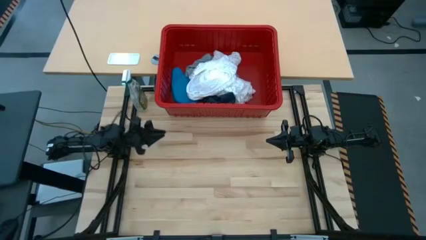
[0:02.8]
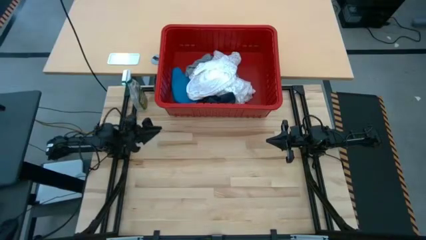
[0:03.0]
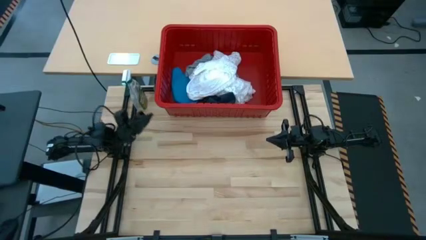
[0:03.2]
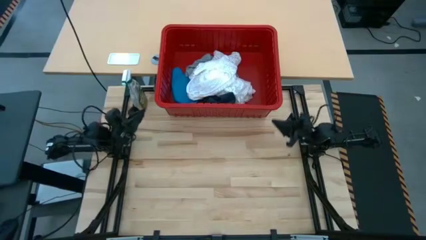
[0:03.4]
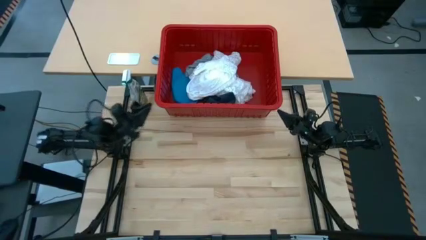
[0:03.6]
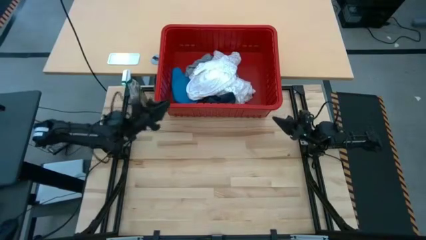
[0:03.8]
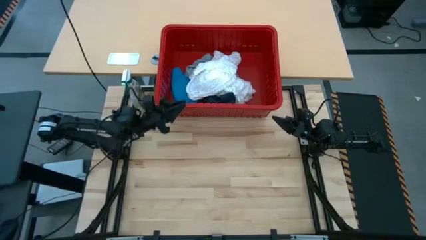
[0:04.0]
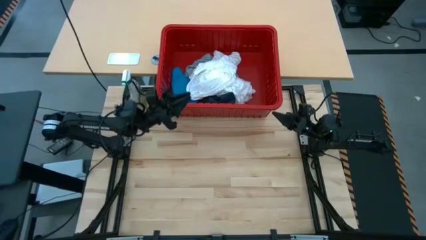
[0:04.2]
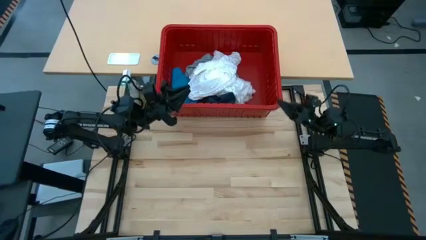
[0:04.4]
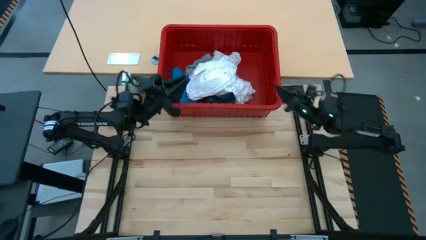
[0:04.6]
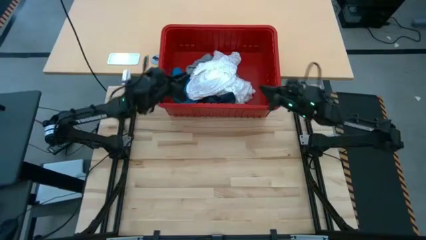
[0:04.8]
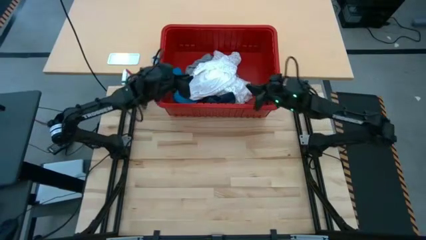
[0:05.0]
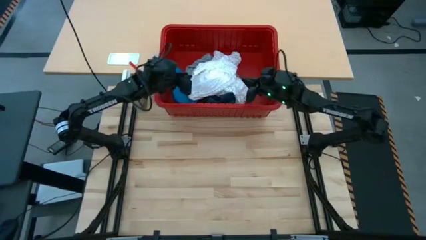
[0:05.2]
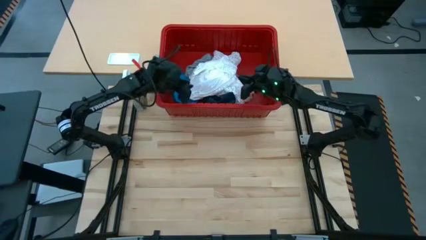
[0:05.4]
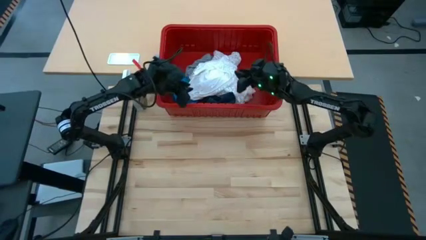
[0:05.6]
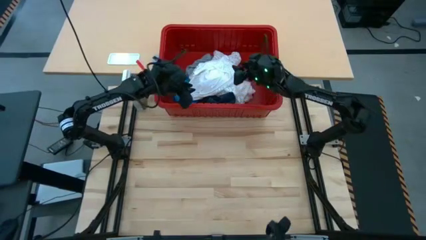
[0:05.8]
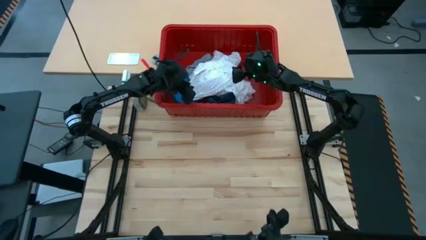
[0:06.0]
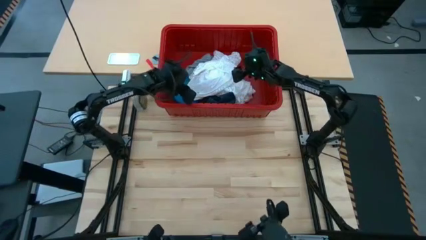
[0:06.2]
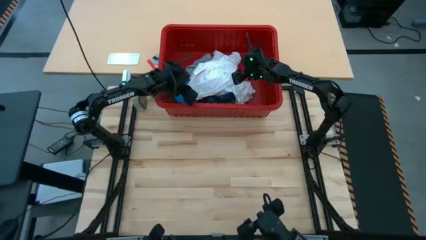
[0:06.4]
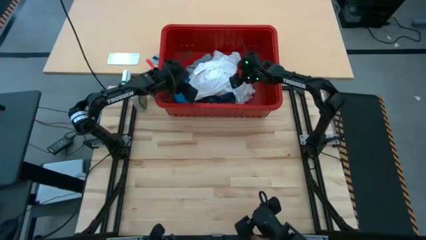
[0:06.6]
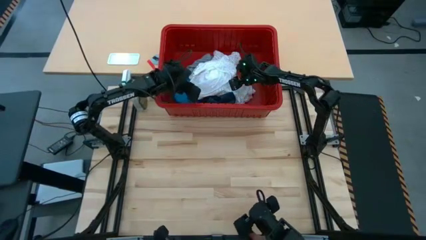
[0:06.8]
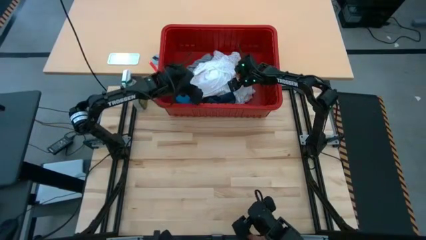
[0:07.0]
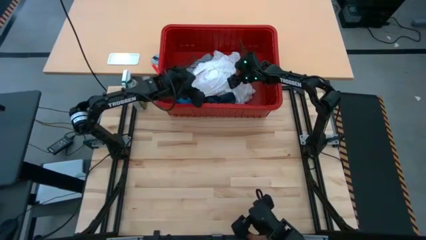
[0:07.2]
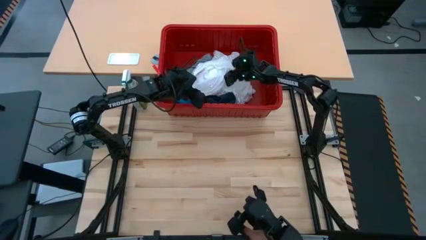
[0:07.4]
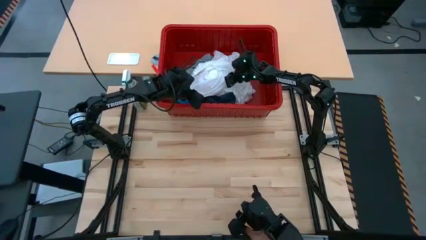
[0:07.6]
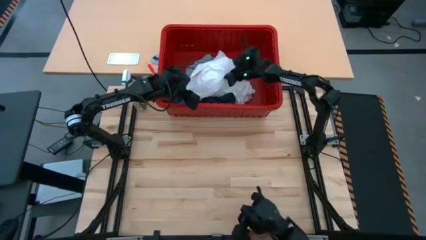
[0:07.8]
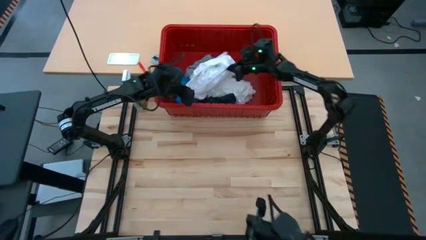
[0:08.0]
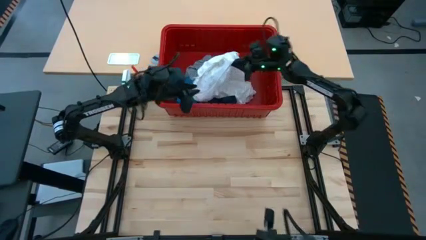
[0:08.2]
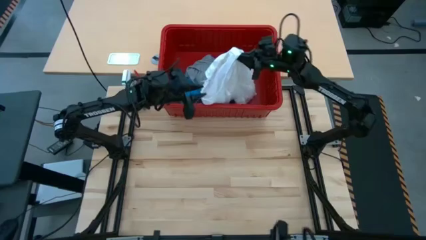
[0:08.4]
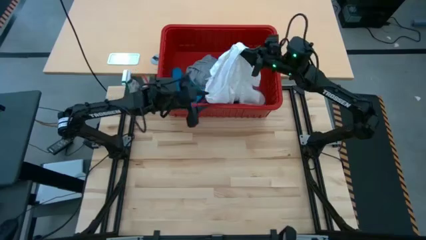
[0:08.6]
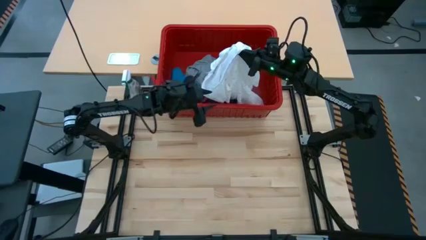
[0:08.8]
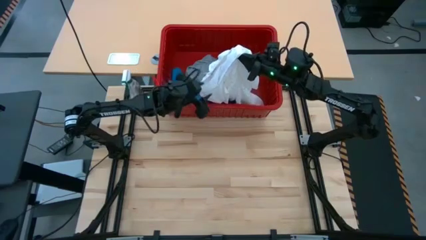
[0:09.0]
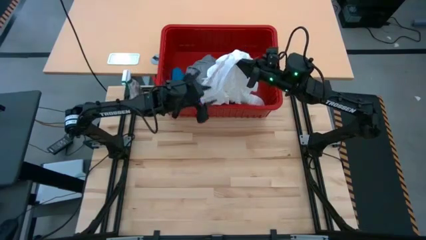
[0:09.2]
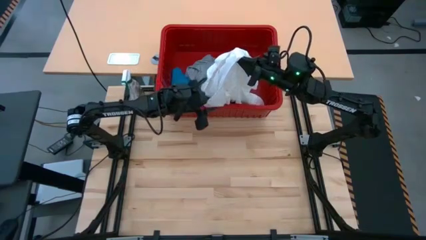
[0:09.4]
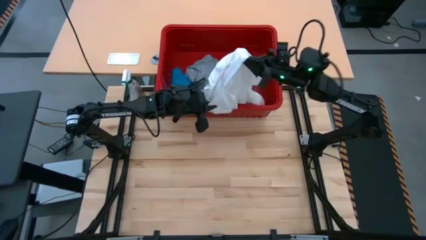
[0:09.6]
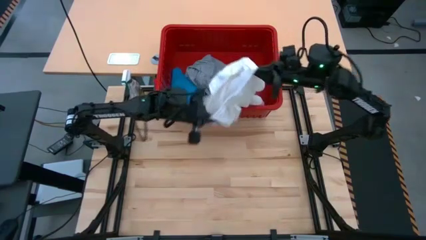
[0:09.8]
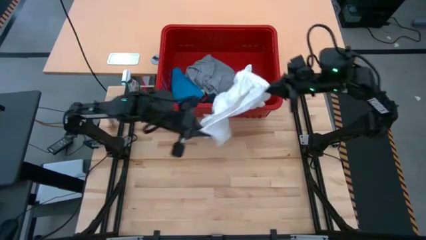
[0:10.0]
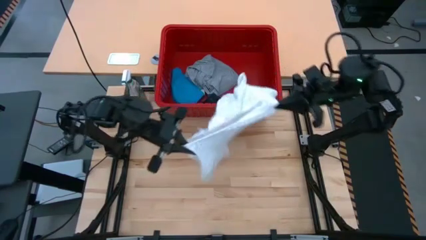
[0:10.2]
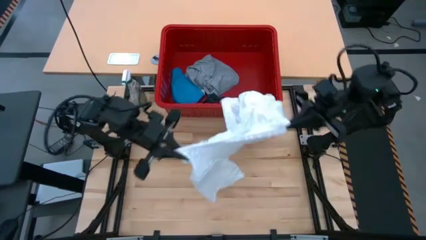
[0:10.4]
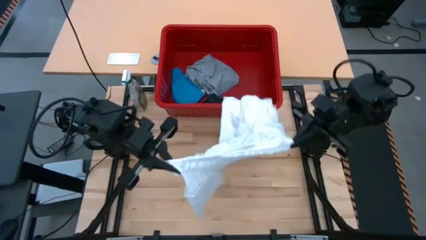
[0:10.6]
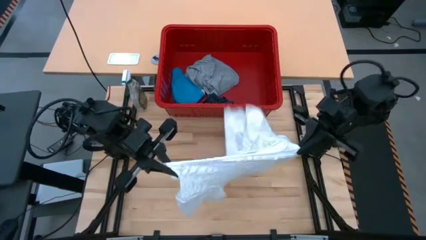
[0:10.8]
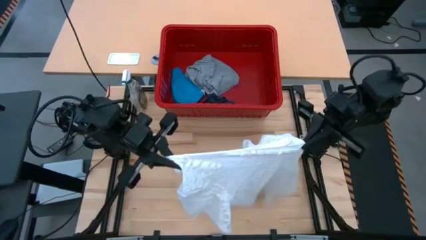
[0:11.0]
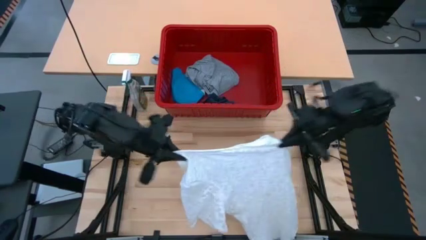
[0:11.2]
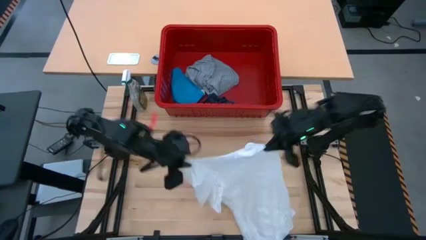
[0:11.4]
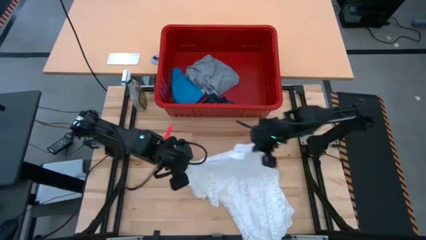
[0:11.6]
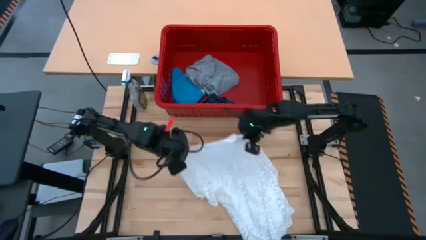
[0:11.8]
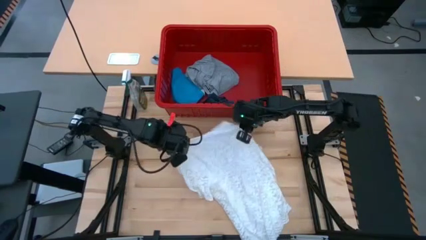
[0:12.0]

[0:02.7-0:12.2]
Task: Fold laundry
Remove the white dress from the red laundry bin

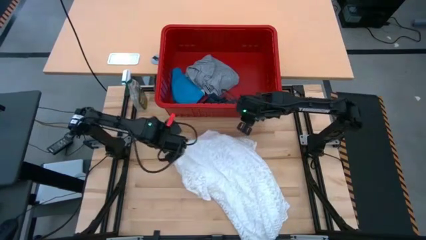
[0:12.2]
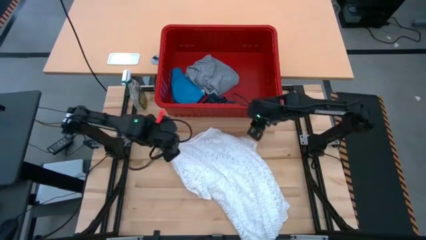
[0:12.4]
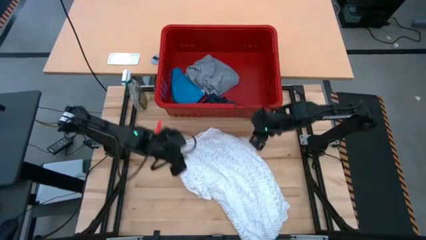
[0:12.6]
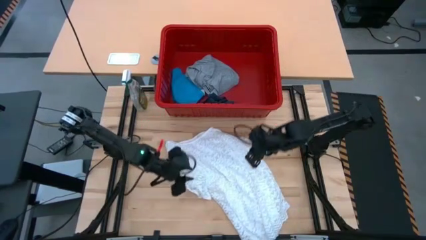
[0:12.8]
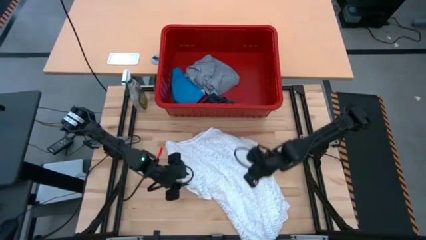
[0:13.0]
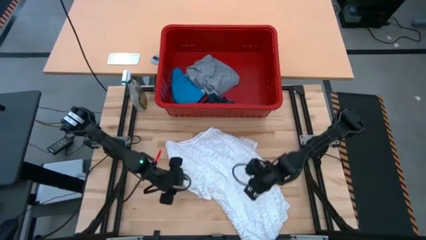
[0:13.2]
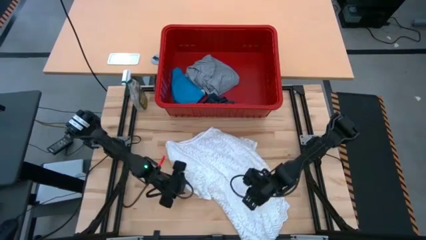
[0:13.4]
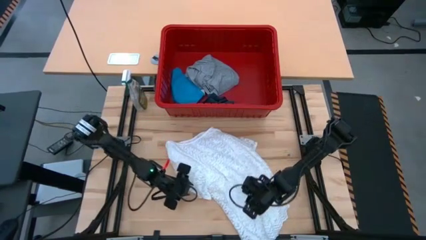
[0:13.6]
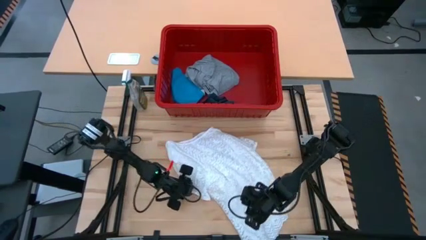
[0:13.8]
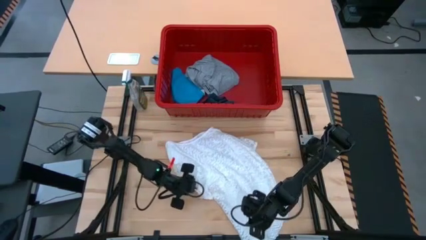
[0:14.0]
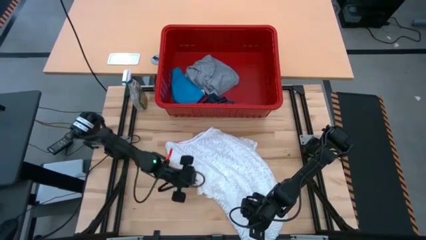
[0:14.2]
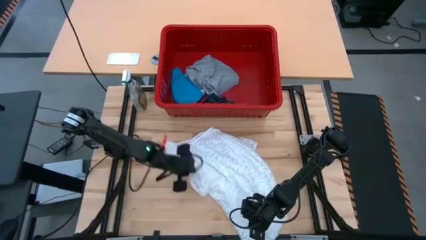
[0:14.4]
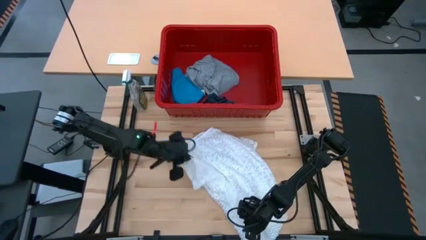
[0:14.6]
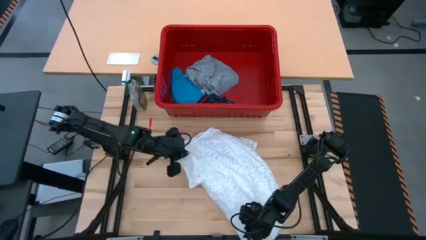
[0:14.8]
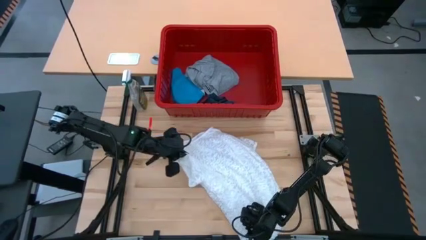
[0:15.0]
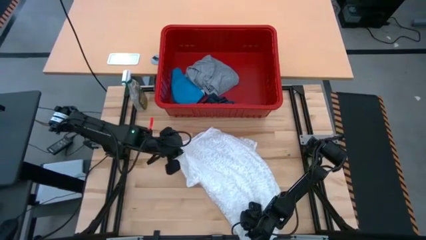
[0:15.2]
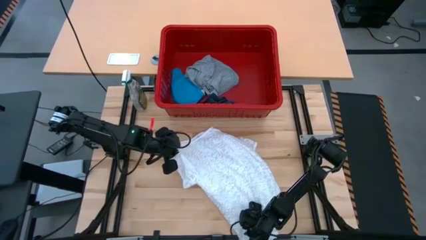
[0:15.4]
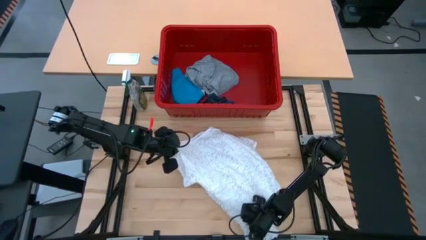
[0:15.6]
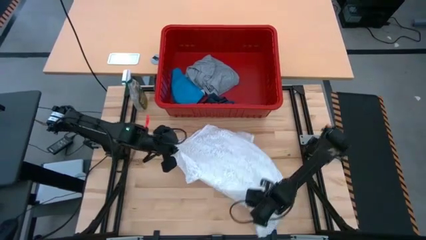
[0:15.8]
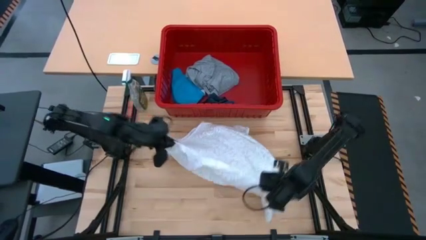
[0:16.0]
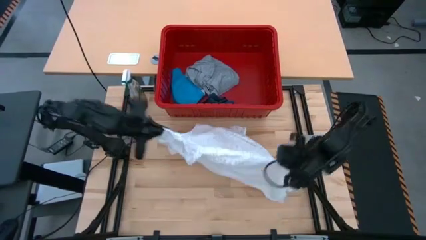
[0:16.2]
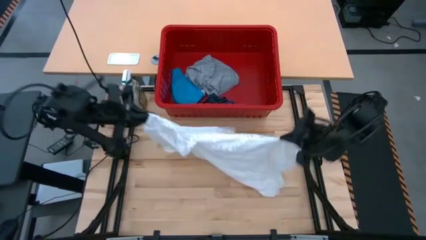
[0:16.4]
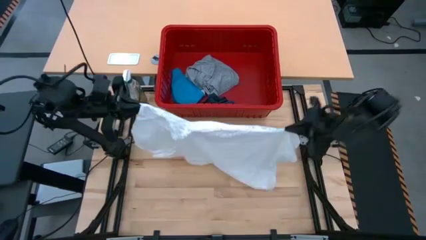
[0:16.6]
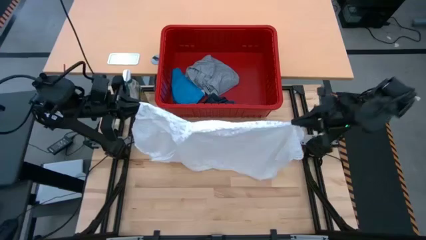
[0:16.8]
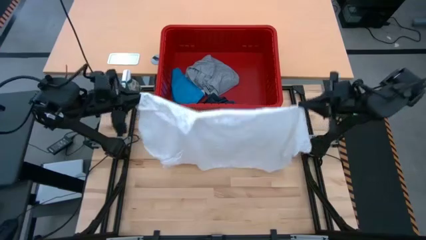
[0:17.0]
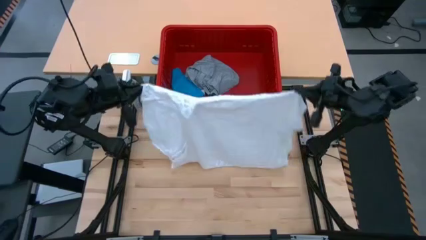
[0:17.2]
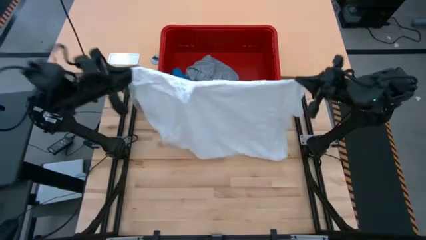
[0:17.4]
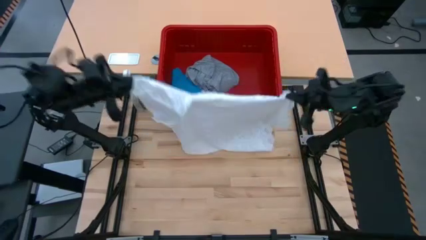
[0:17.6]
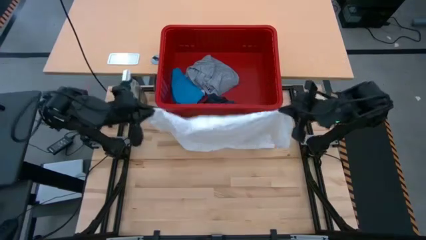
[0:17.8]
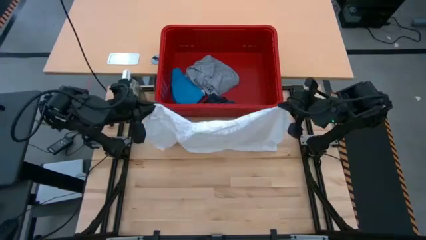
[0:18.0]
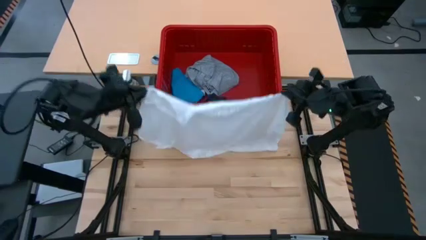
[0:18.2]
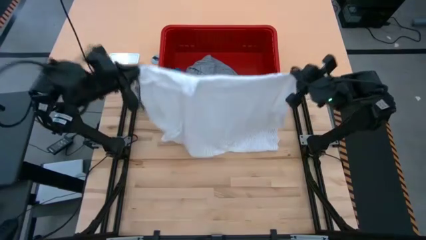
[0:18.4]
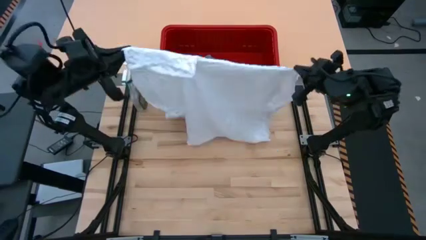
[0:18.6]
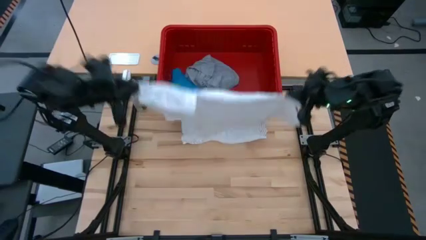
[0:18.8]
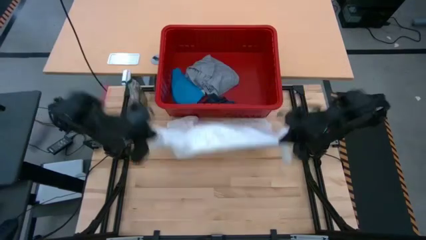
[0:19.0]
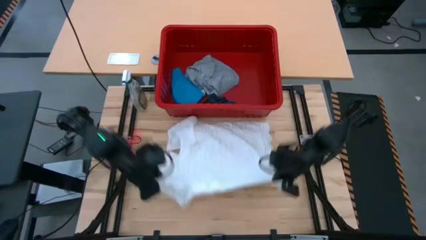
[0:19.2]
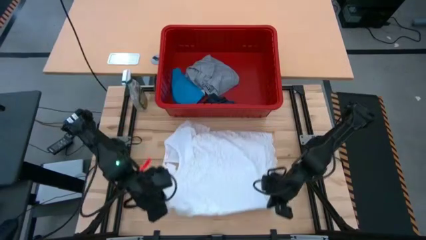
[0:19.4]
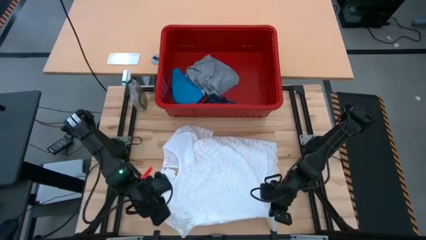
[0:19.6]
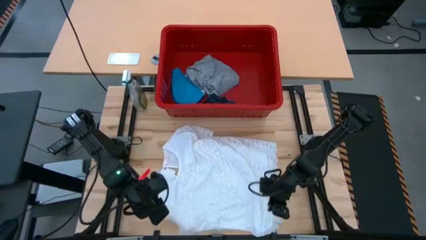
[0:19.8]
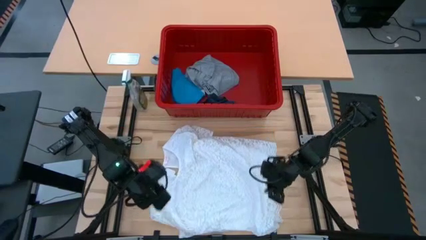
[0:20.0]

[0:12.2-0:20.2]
Fold the white dress on the table

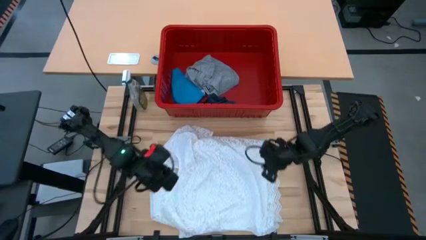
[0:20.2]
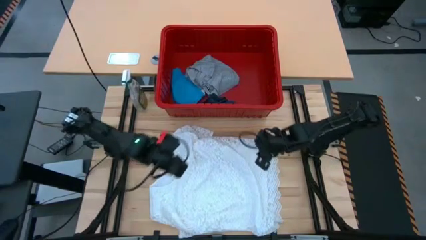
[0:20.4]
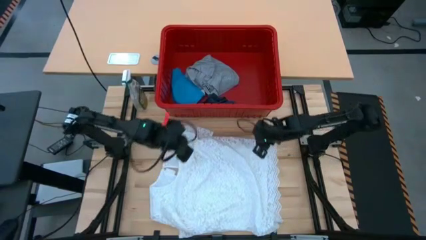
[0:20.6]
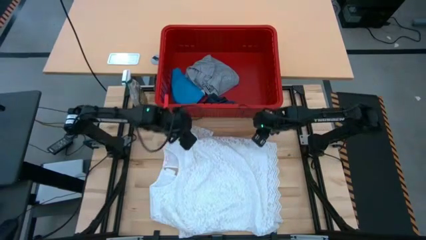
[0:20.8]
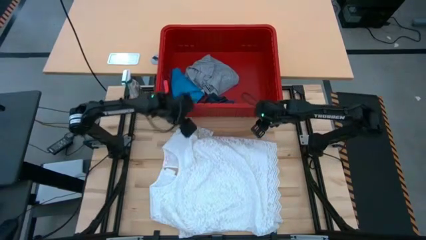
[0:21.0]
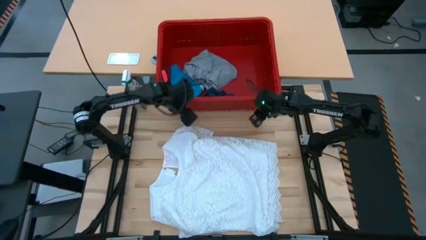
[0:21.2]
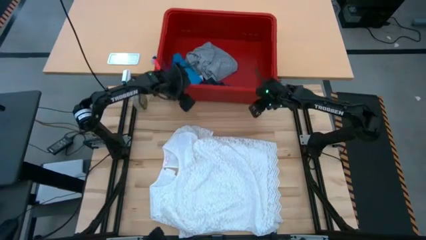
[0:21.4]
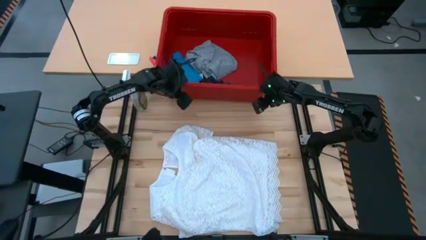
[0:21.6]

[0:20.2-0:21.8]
Adjust the red laundry bin
